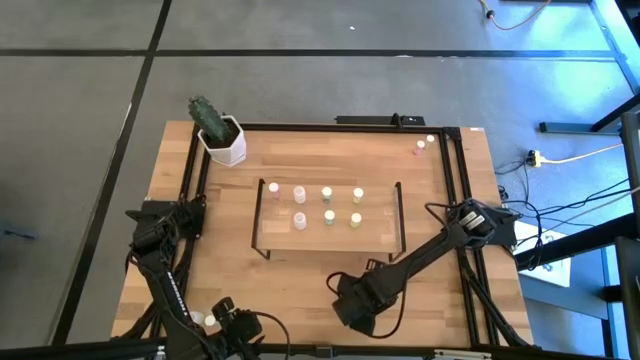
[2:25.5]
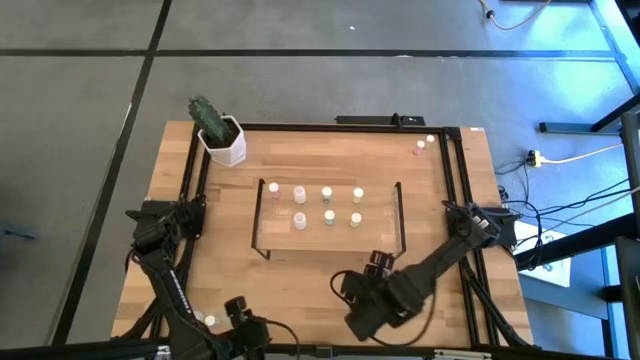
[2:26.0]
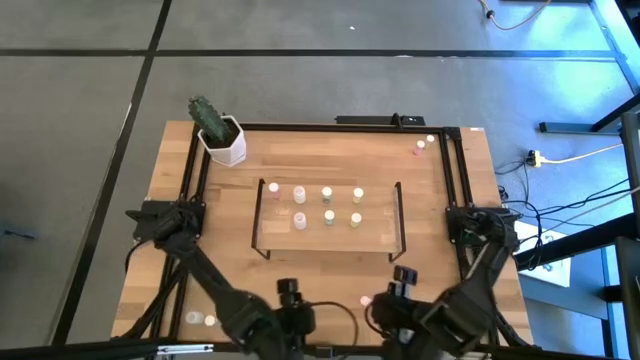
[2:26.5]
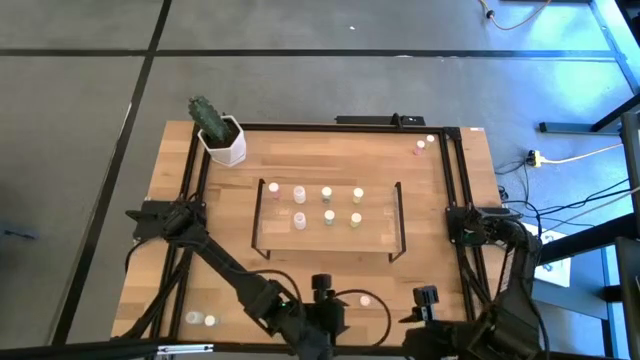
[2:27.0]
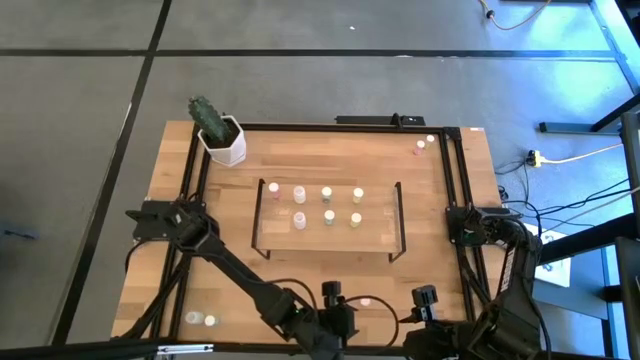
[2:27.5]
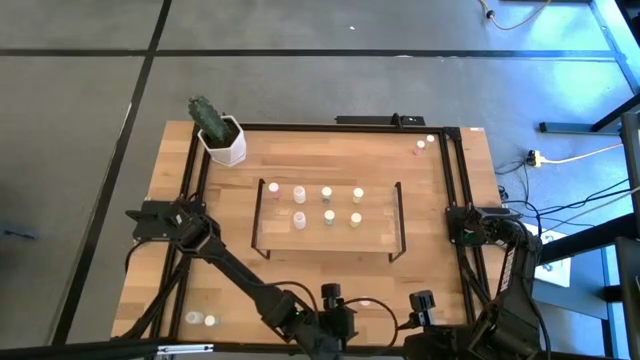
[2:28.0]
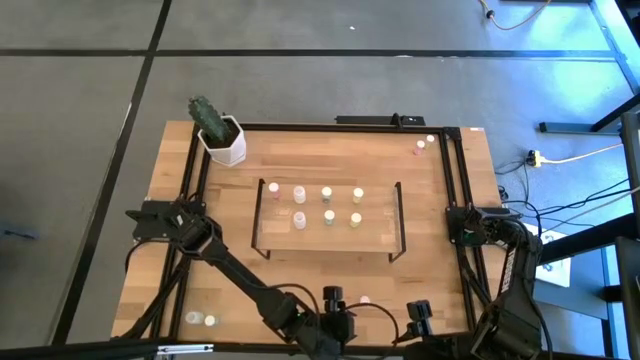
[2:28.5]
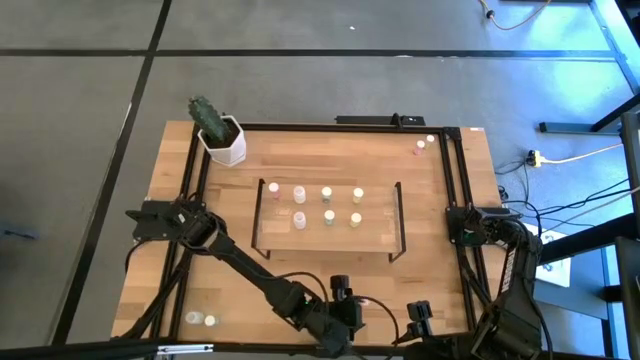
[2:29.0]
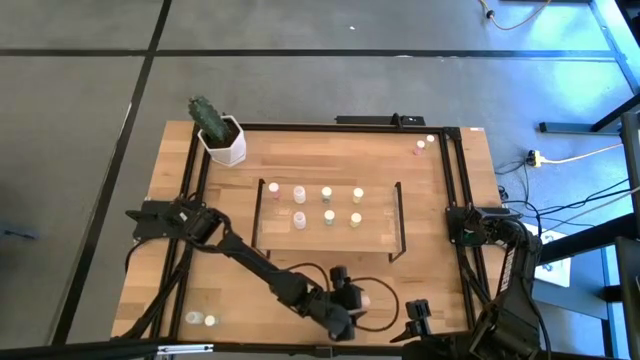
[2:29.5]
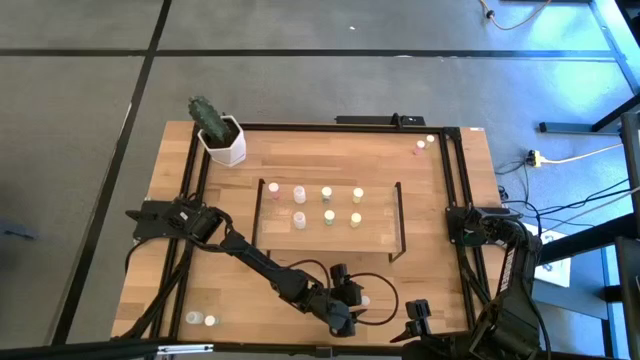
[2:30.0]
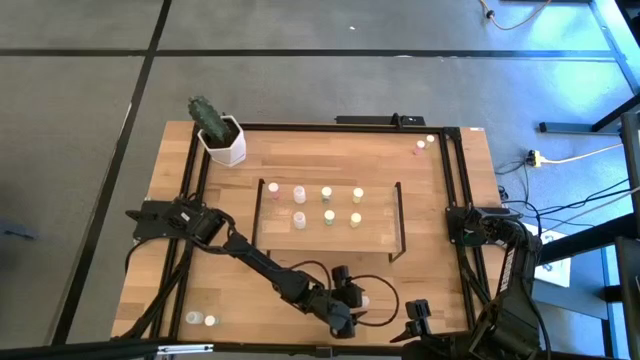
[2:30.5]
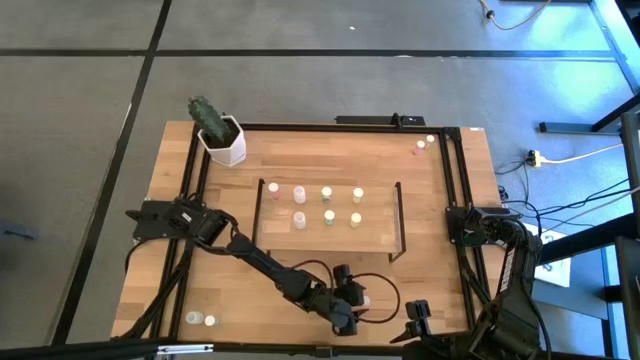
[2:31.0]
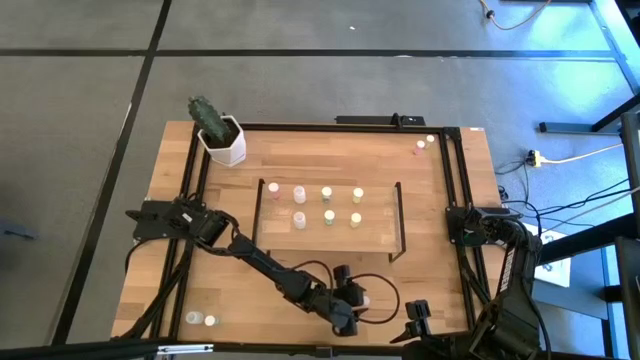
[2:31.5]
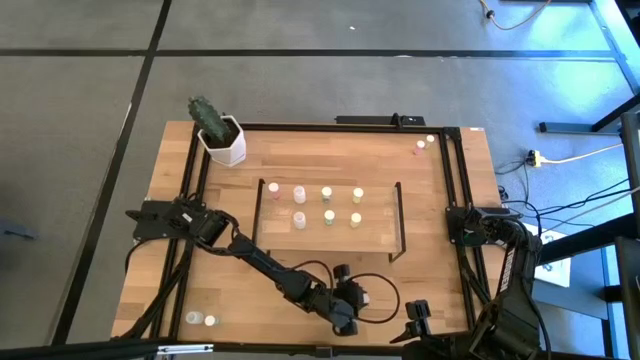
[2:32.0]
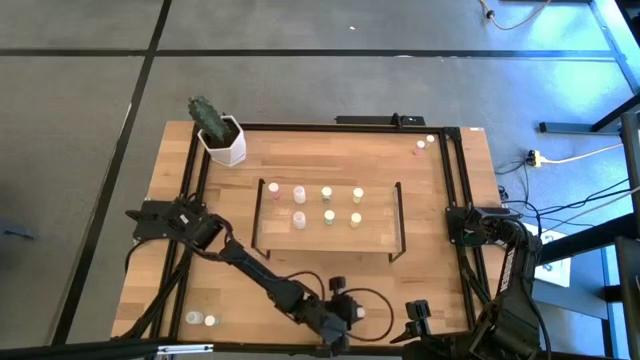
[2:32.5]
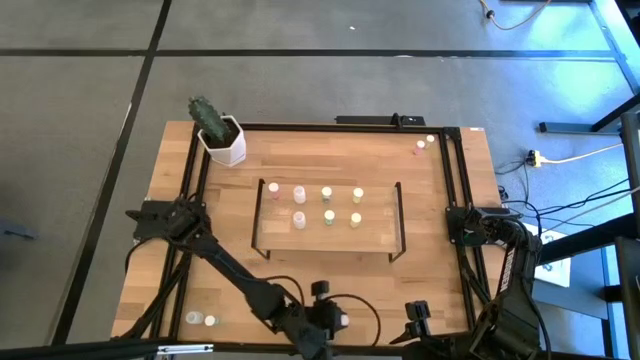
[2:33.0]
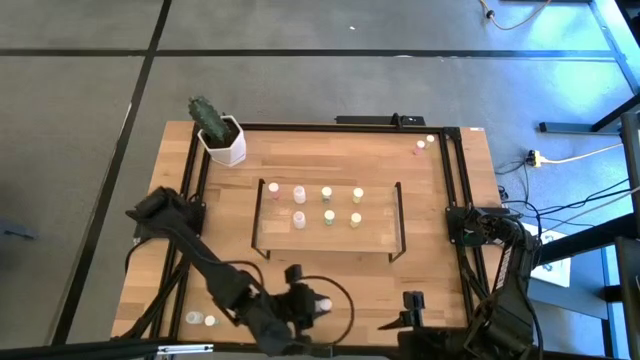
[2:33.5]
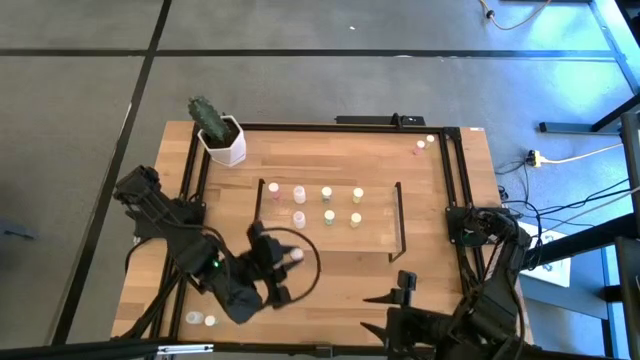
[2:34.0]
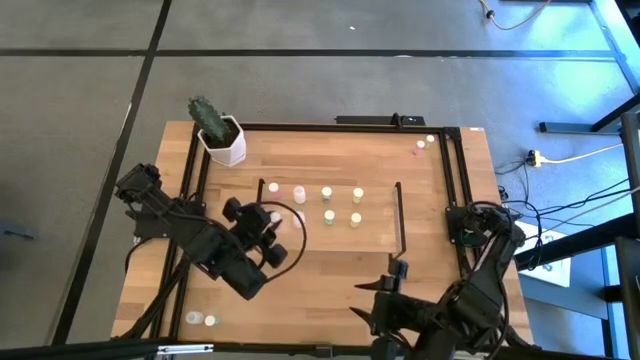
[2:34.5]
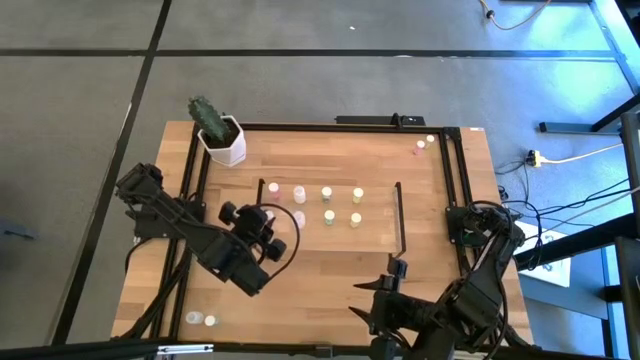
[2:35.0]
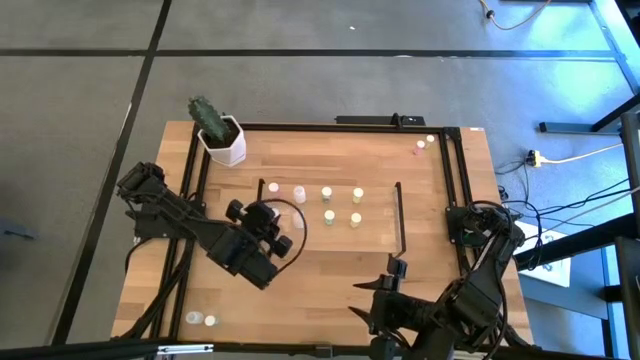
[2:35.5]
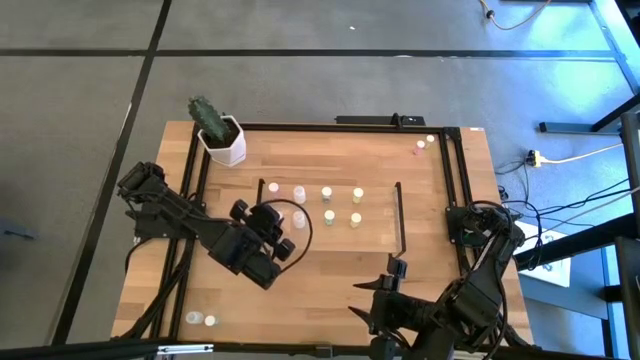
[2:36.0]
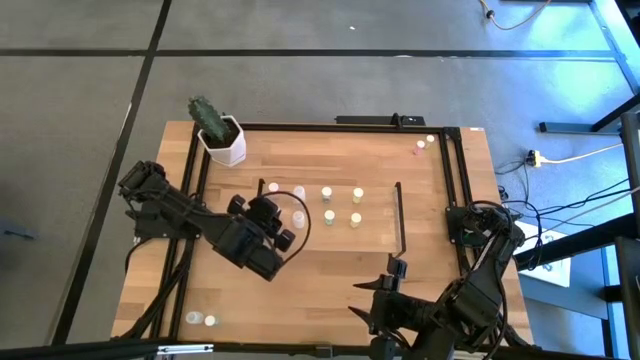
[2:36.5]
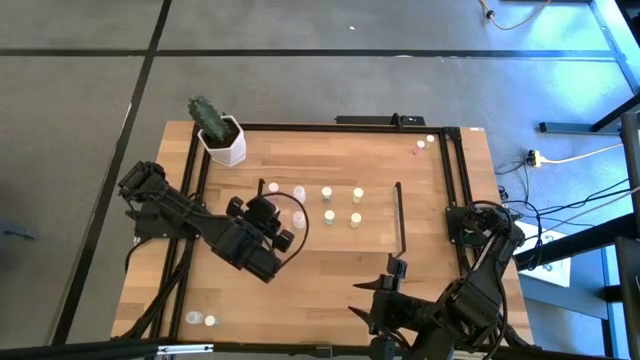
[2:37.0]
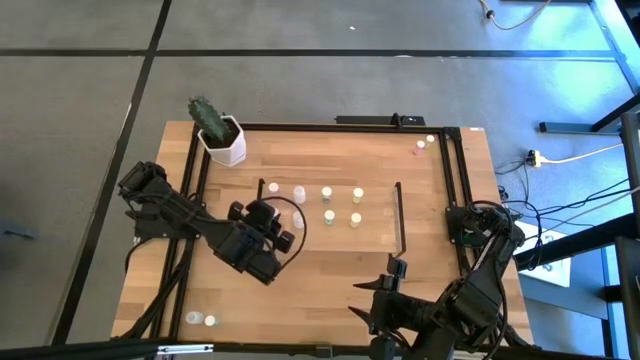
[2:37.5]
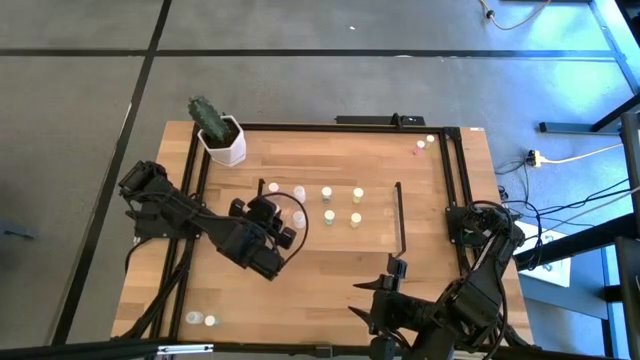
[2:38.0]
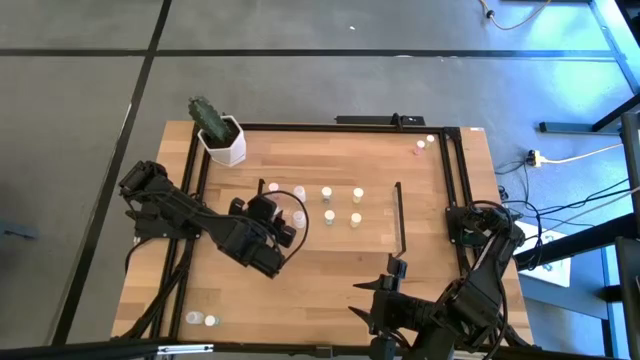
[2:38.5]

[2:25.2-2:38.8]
Task: Pick and place medicine bottles onto shelf by color
Put the bottom pink pill bottle on the shelf aligned with the other pink pill bottle

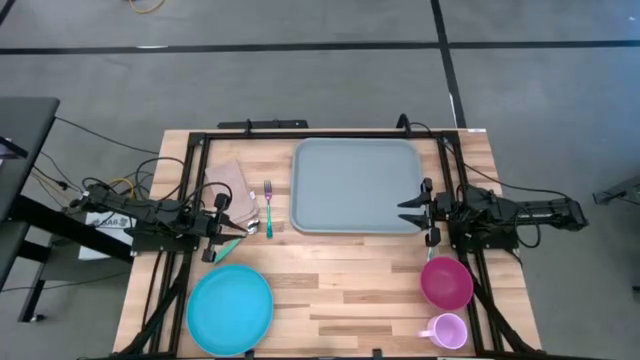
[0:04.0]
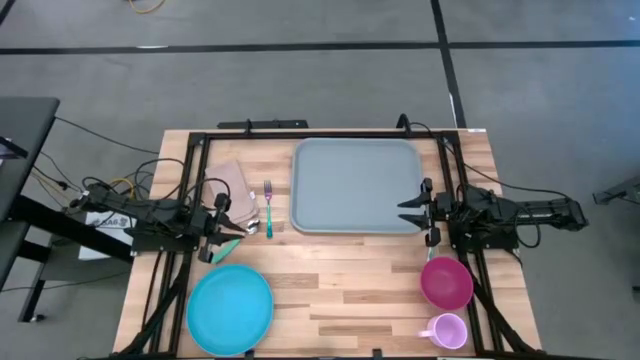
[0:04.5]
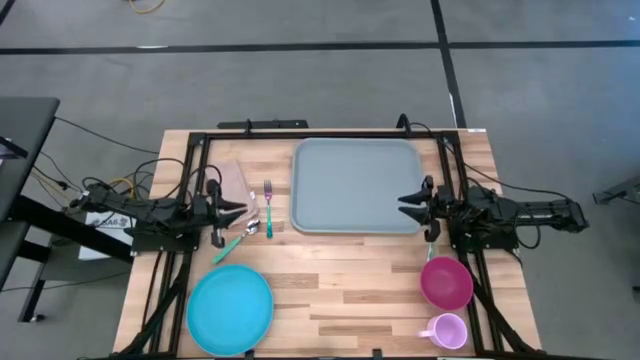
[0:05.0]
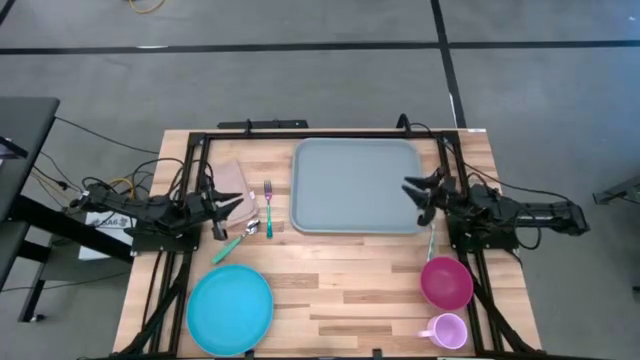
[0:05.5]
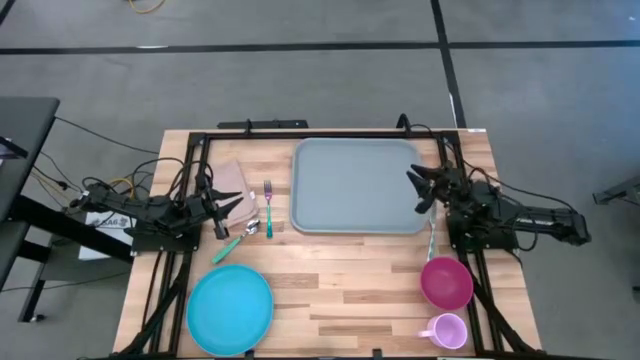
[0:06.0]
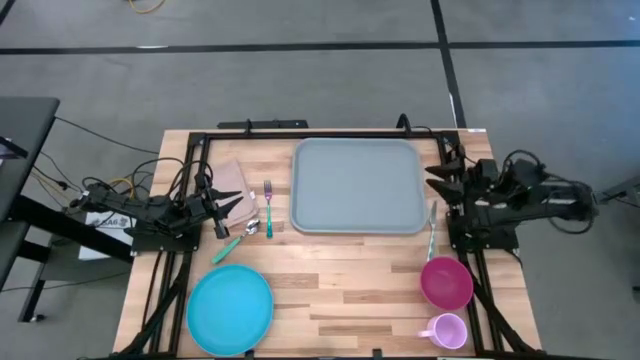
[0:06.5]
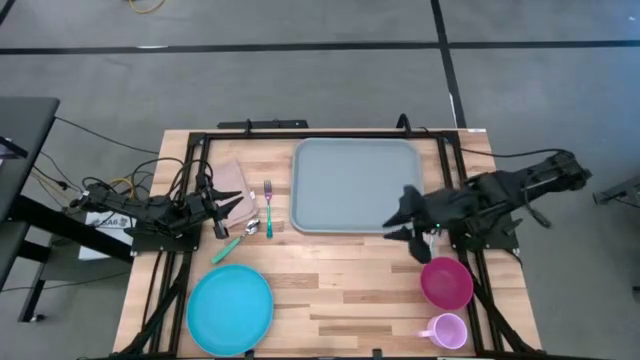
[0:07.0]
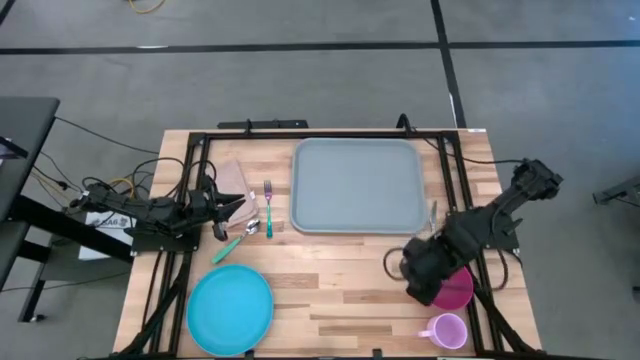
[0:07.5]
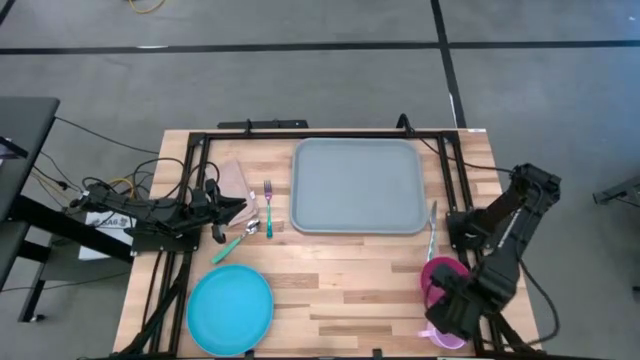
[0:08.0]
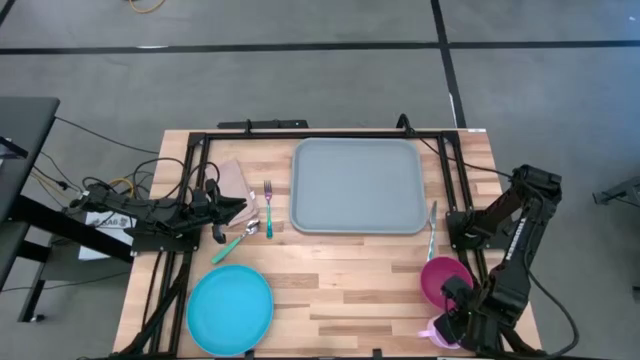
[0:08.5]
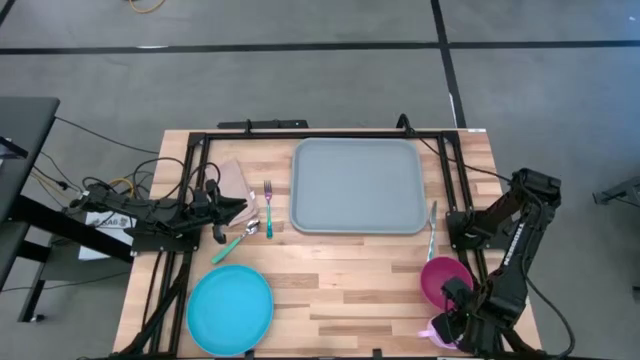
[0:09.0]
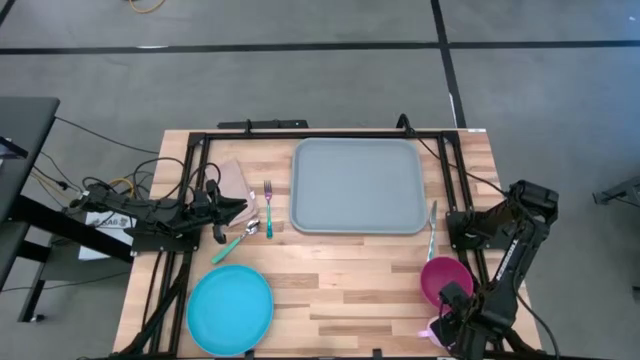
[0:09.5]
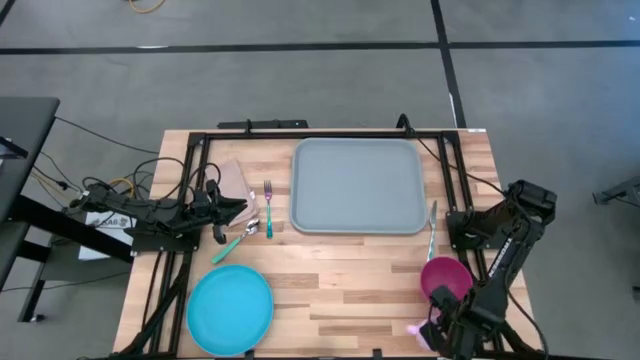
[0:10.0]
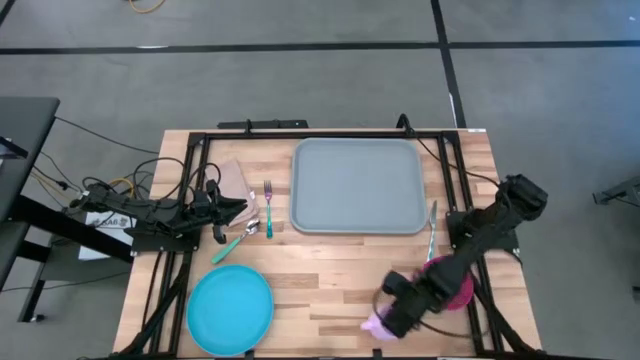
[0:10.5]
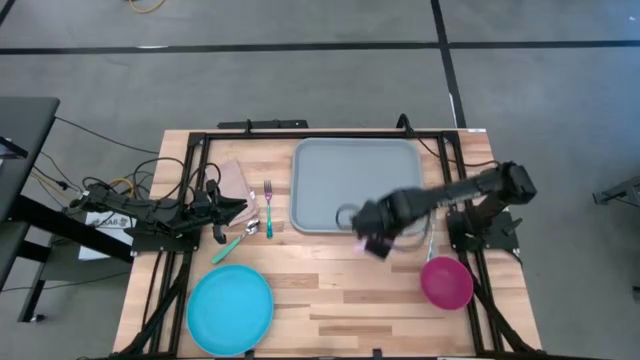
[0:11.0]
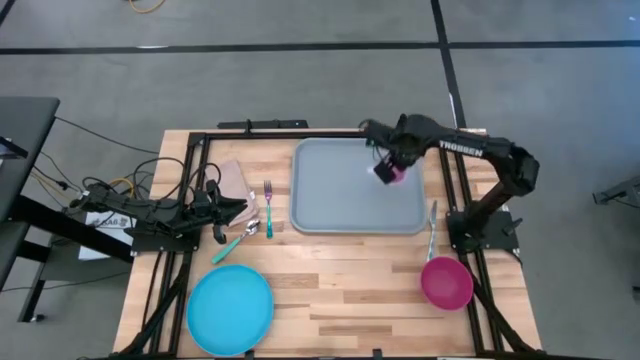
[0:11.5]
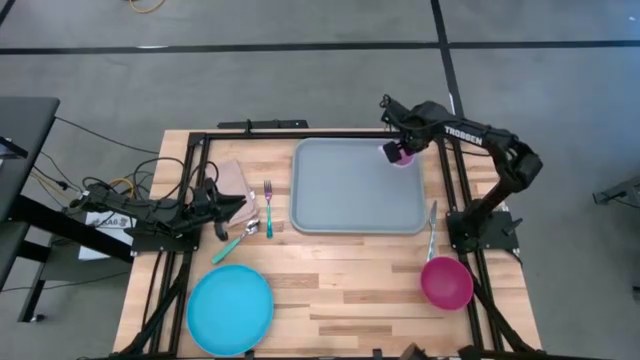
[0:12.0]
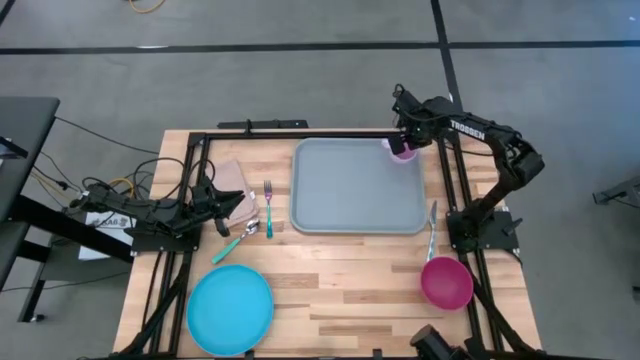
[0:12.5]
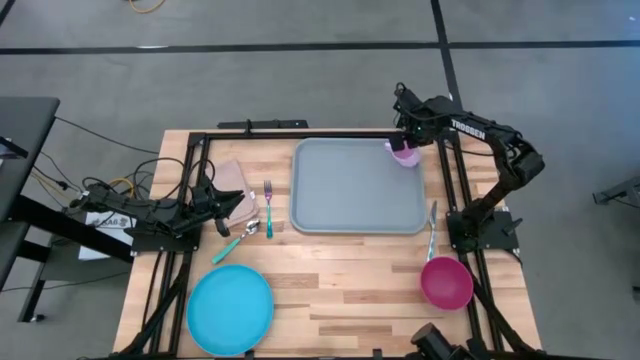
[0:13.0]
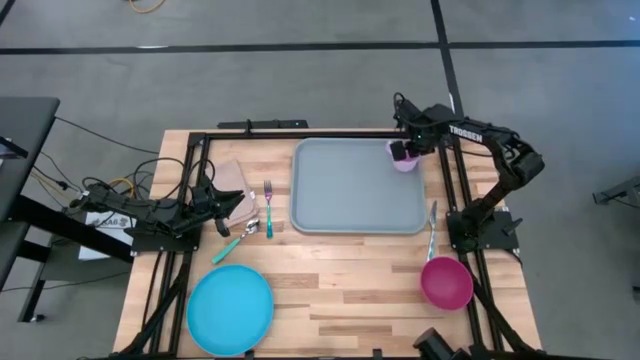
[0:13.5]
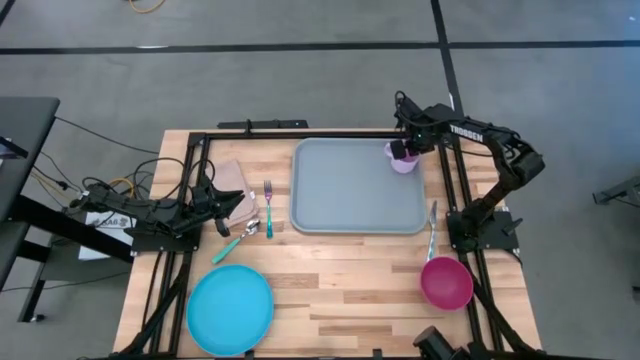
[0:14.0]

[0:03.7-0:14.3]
Task: Set up tray
Put the pink cup on the top right of the gray serving tray
